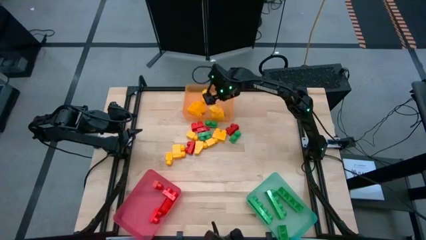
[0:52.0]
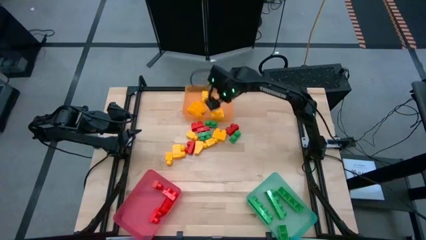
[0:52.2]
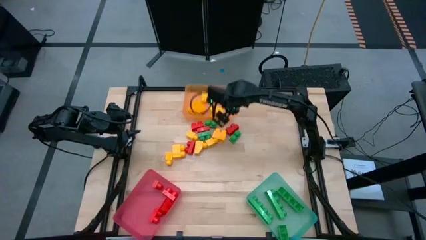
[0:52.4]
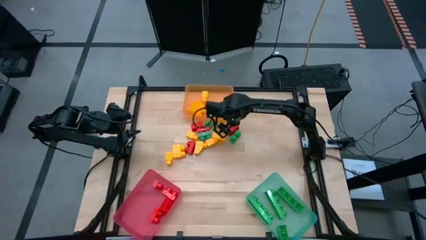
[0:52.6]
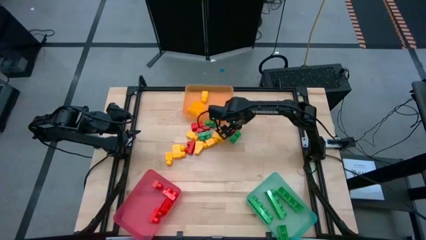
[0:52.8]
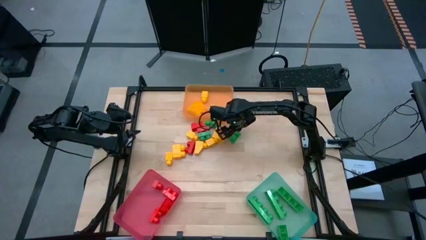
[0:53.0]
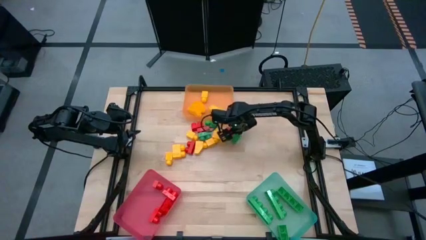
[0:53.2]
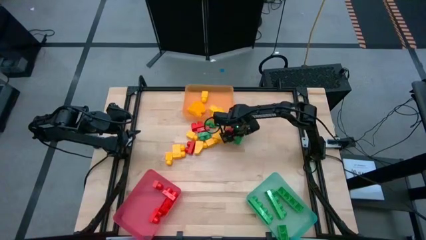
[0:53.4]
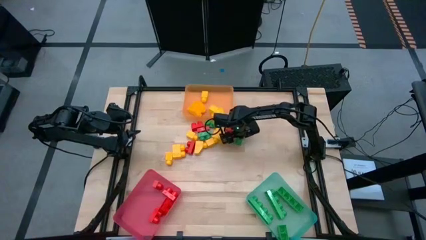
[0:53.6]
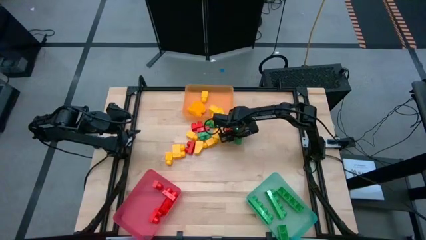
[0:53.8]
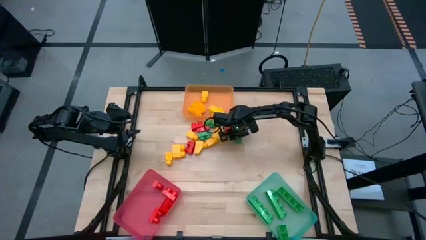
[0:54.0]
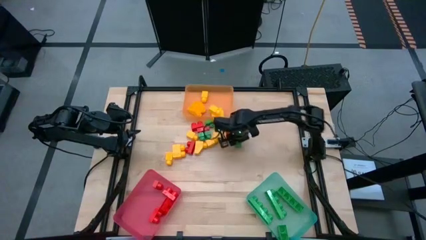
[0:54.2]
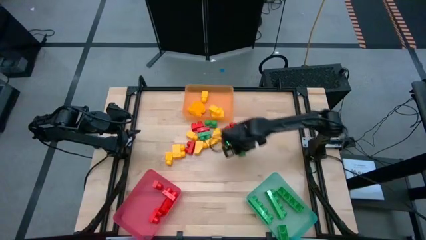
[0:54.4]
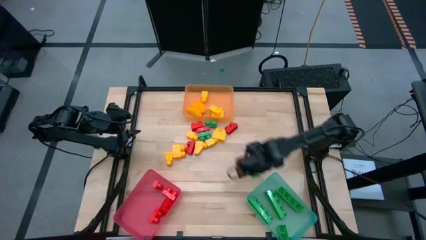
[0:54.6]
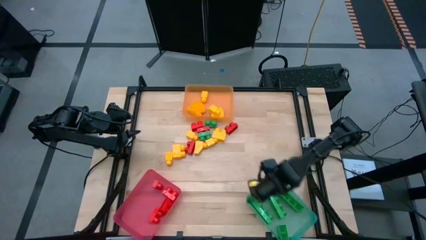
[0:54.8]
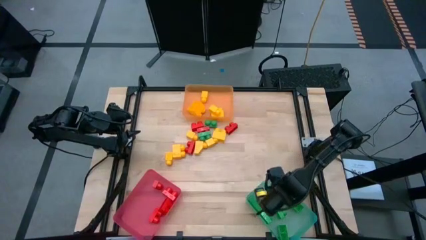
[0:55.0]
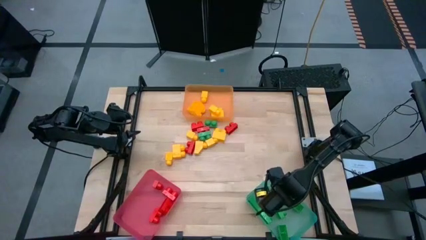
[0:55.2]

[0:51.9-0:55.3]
Task: Sort blocks
Put the green 2 stud game piece into the light green bin

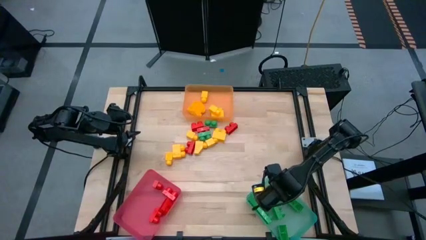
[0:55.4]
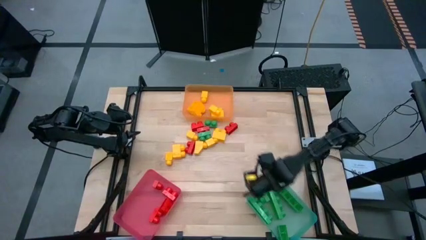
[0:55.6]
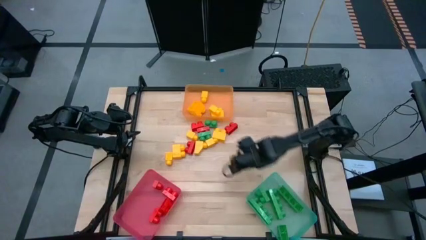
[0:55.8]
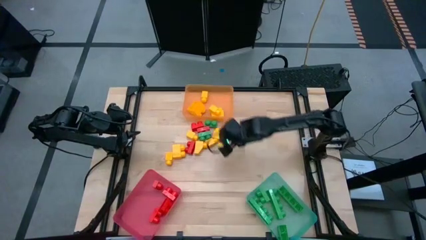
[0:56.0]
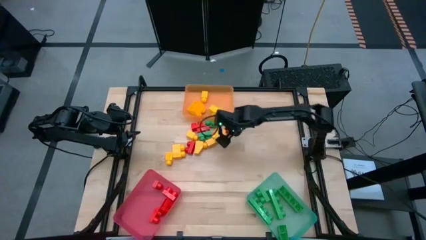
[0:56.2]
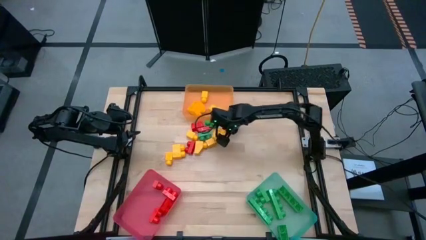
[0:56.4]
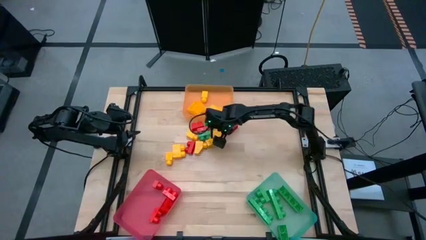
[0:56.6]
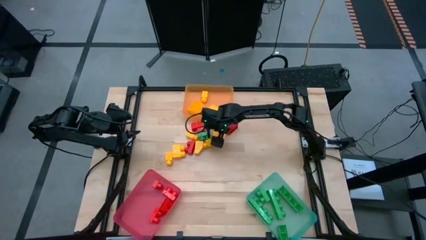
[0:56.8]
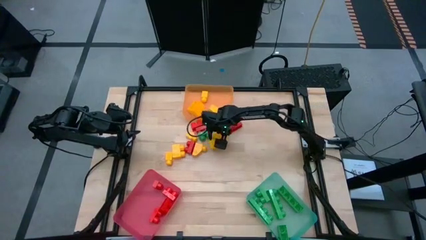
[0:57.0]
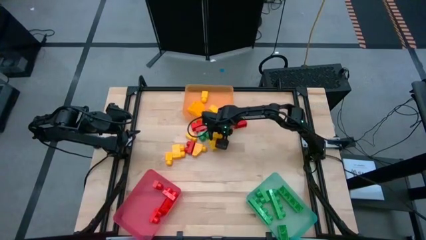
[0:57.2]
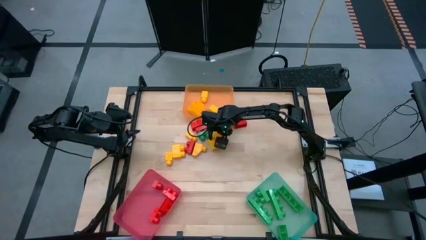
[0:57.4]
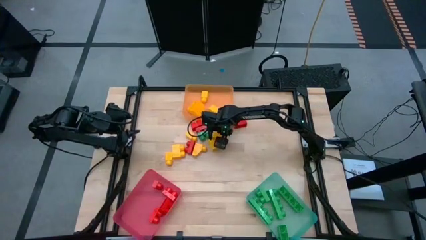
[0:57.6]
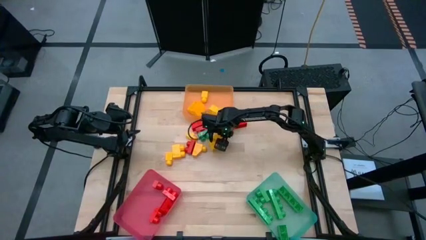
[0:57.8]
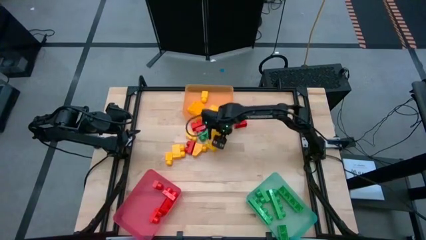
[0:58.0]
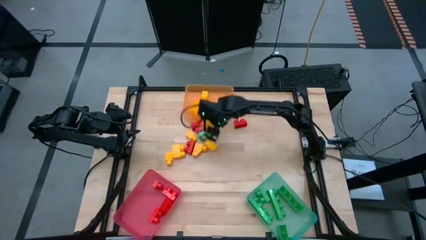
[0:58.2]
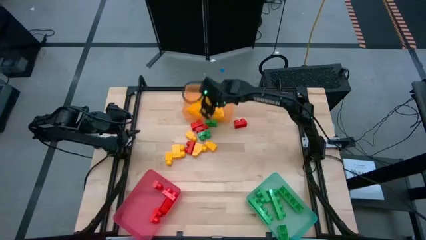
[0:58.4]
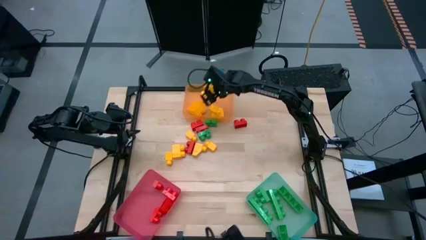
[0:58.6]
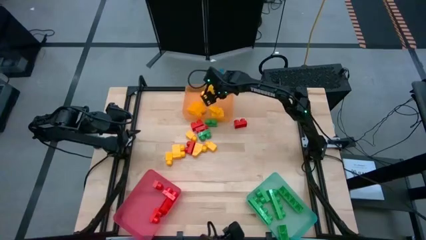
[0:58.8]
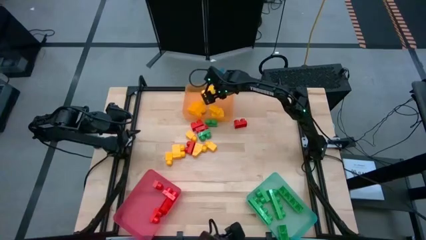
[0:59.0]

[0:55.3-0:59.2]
Put the yellow 2 stud game piece into the orange bin

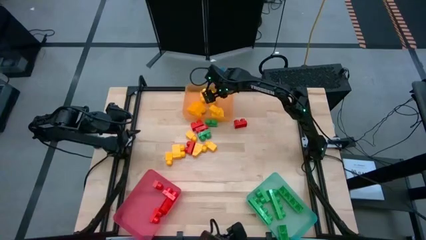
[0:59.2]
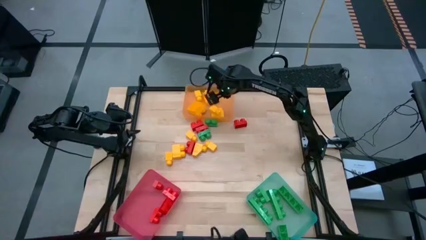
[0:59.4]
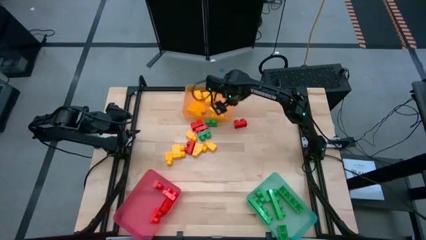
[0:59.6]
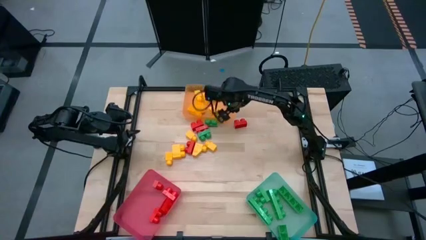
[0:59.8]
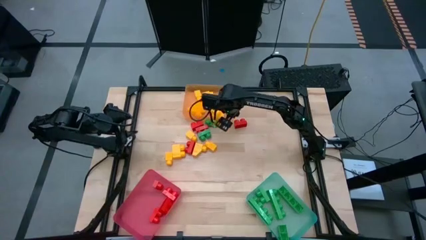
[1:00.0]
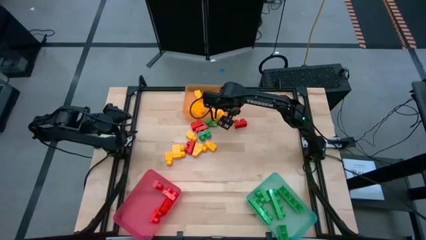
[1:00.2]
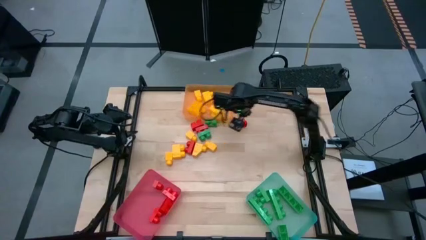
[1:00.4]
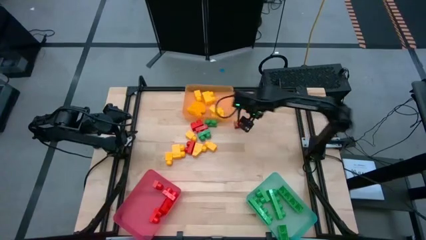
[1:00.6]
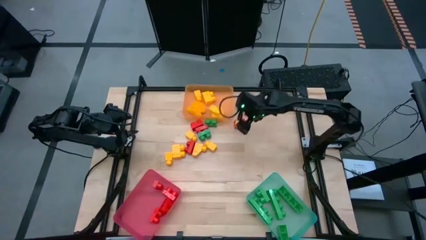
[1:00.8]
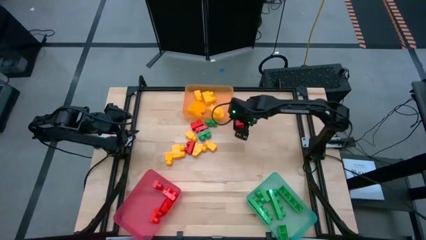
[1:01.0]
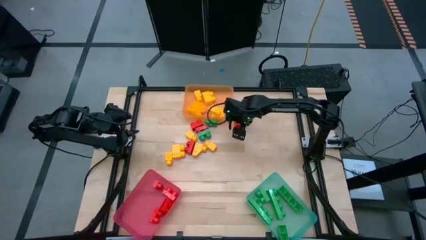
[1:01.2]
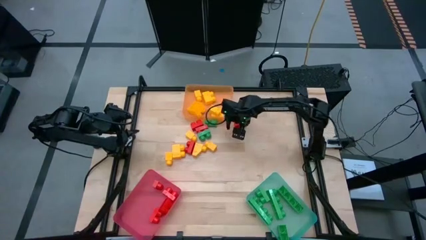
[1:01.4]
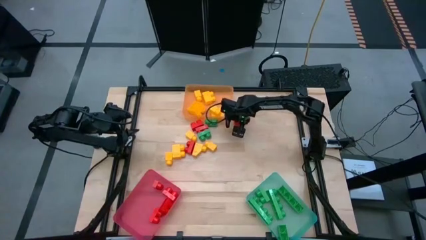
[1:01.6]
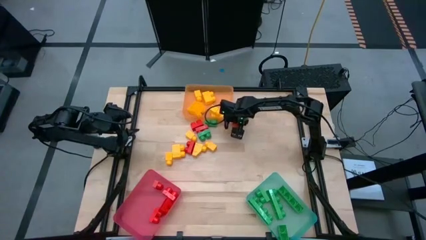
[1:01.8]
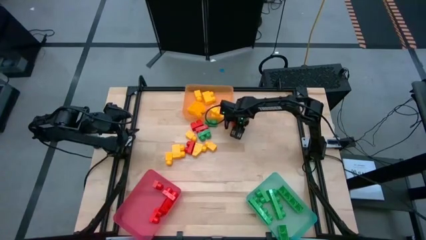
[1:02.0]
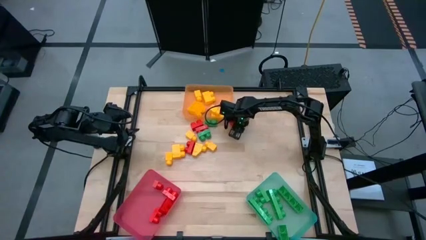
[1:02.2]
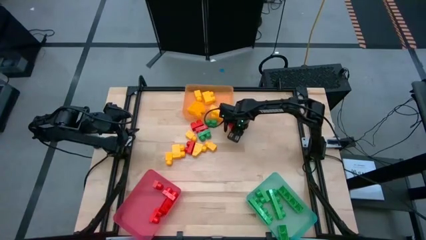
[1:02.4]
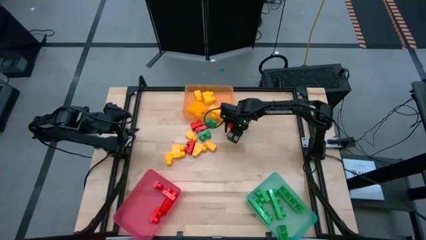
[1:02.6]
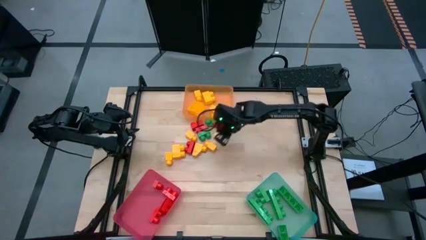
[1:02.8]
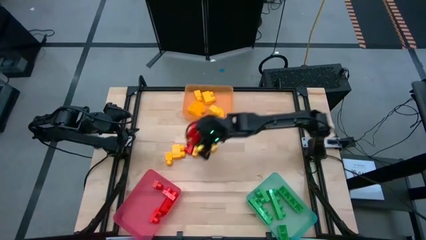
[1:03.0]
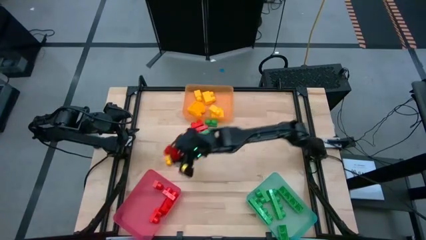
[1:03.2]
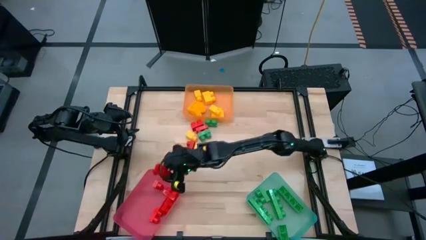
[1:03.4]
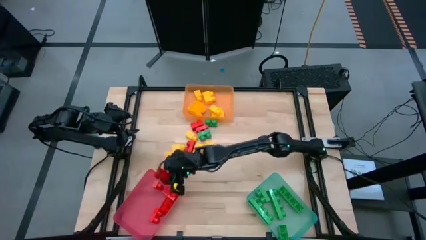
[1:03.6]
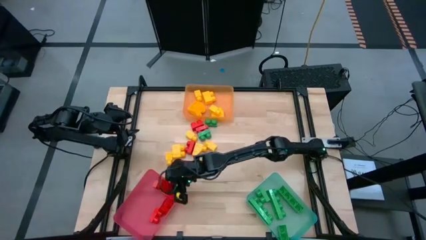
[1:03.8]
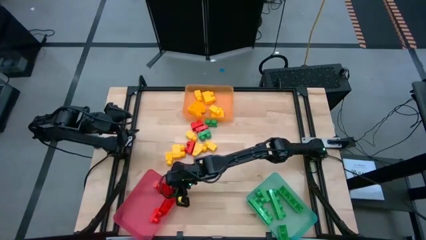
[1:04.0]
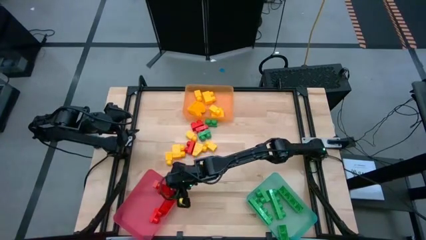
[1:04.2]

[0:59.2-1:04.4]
Put the red 2 stud game piece into the pink bin

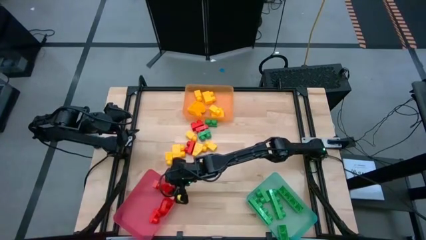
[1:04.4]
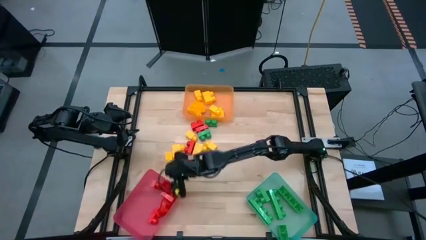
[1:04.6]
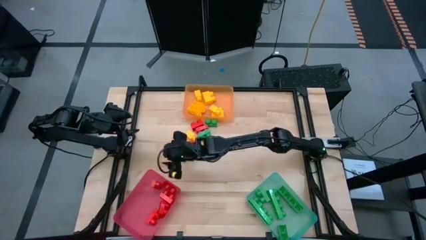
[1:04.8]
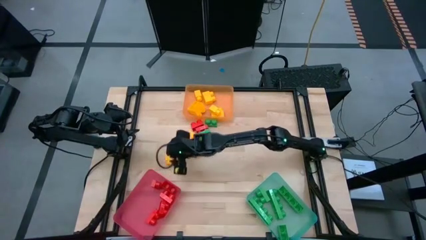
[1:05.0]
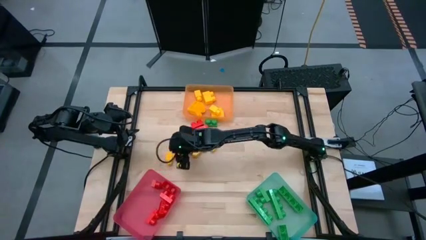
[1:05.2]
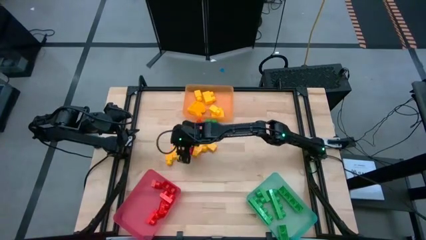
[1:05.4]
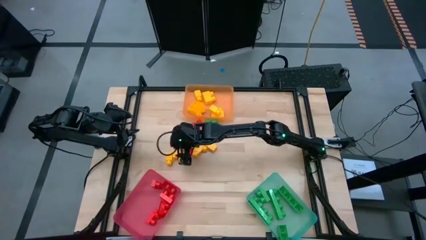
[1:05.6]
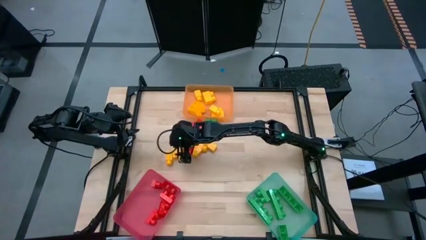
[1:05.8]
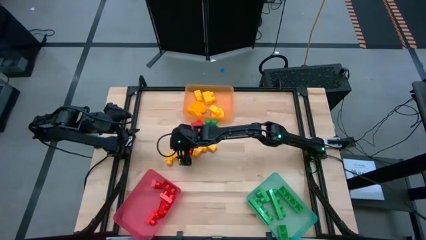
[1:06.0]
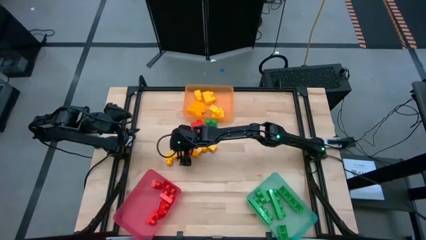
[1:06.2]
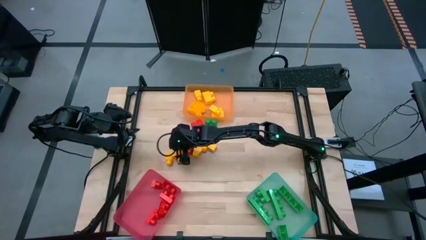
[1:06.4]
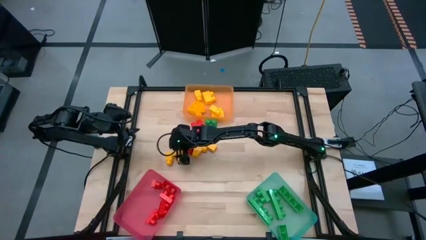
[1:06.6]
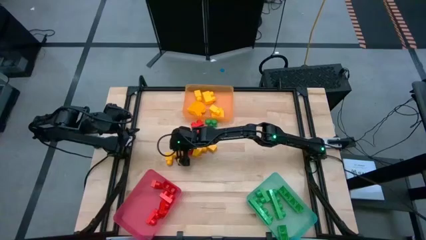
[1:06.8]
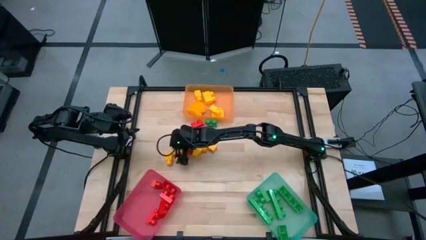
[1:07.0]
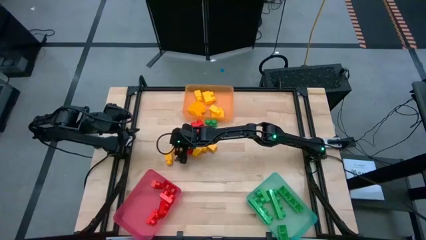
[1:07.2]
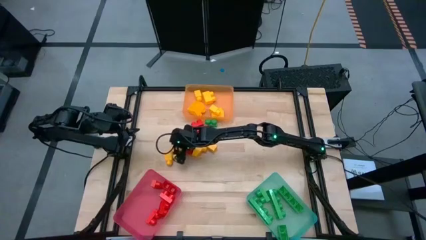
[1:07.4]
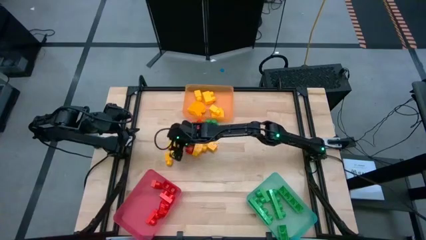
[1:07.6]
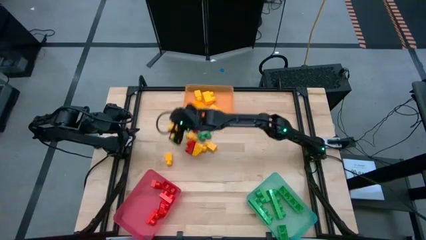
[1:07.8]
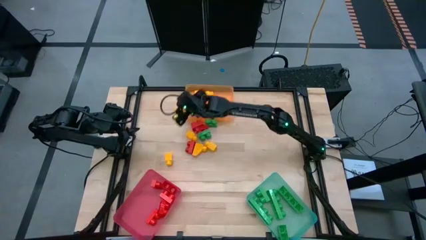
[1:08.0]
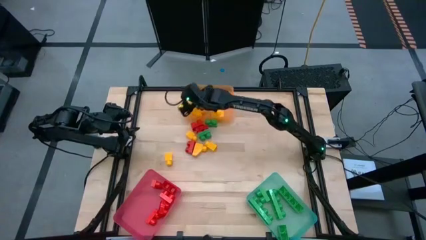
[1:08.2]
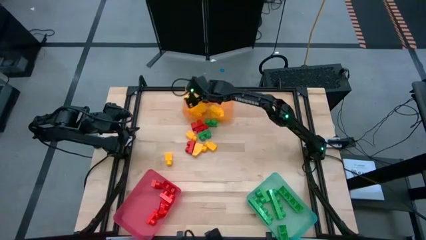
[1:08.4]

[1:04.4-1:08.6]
Put the yellow 2 stud game piece into the orange bin
